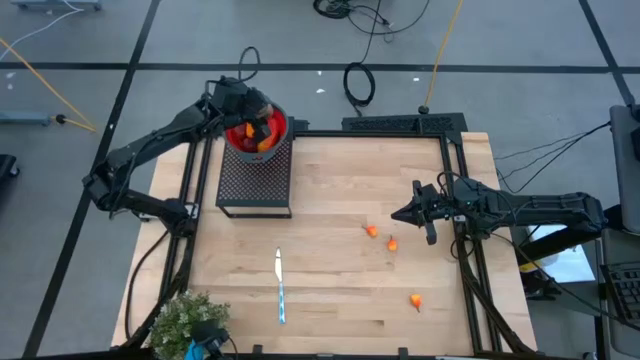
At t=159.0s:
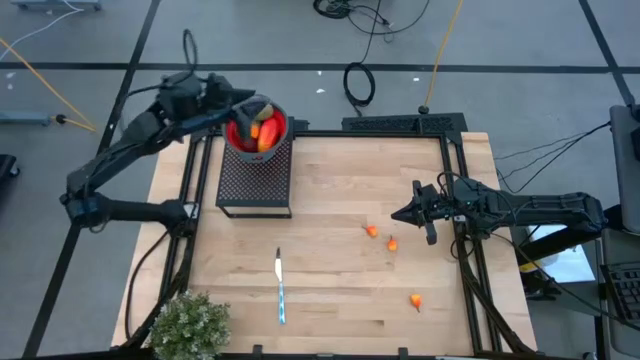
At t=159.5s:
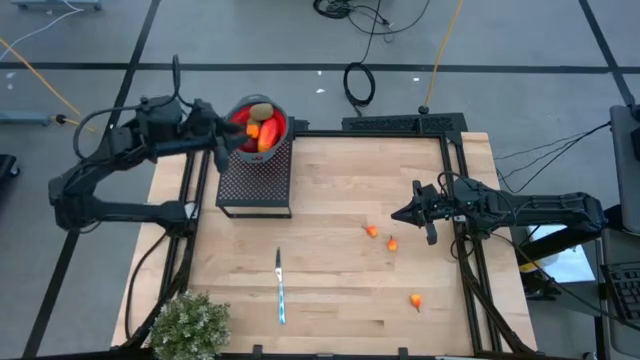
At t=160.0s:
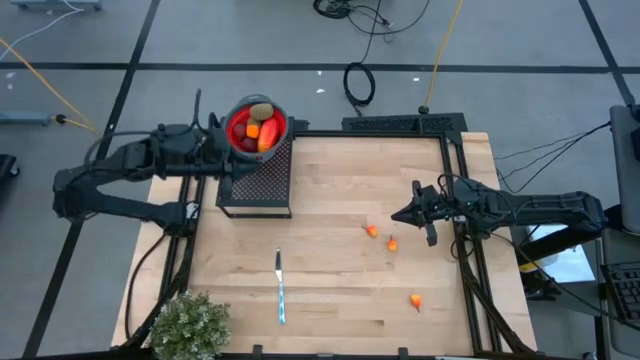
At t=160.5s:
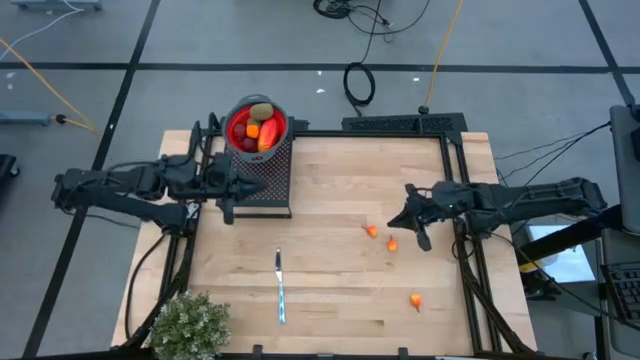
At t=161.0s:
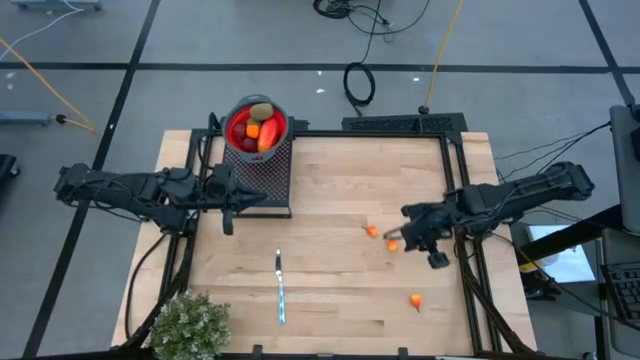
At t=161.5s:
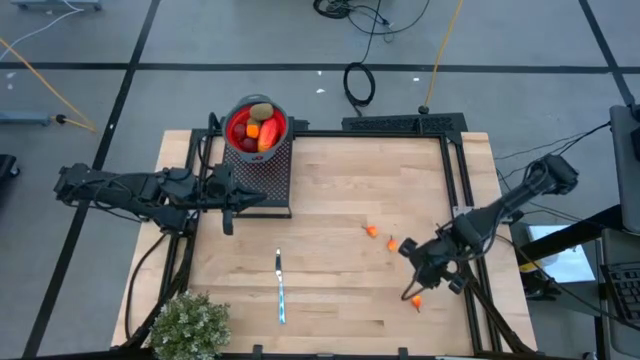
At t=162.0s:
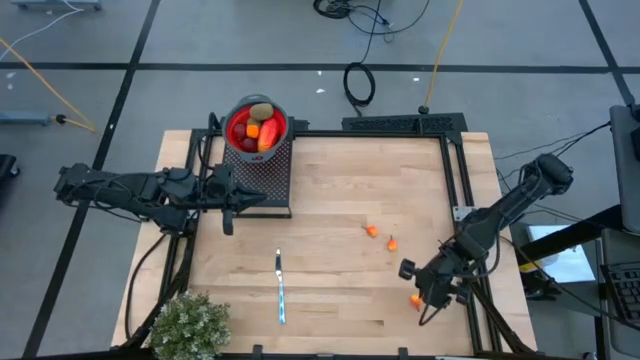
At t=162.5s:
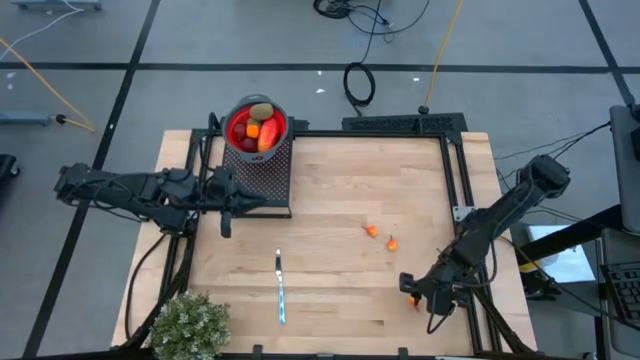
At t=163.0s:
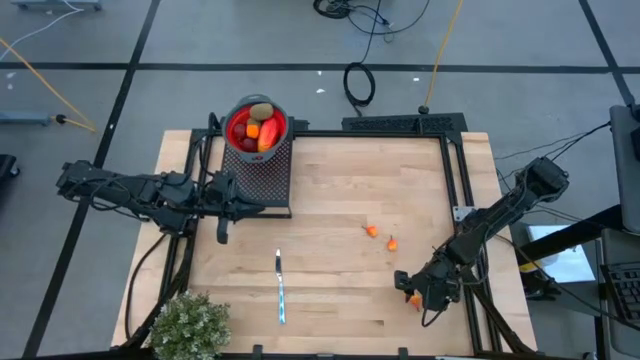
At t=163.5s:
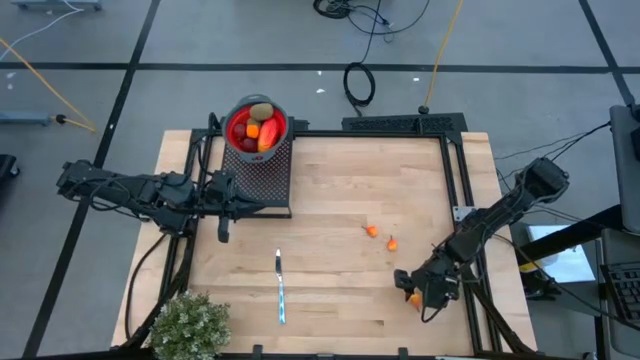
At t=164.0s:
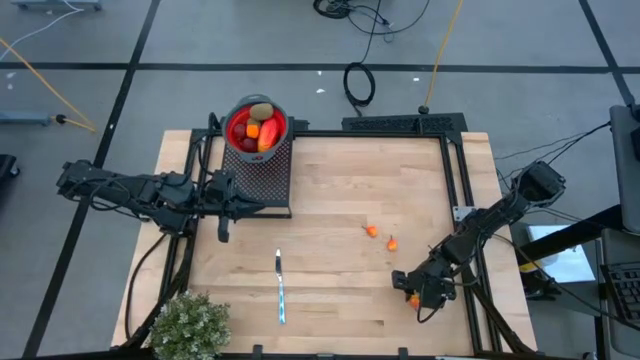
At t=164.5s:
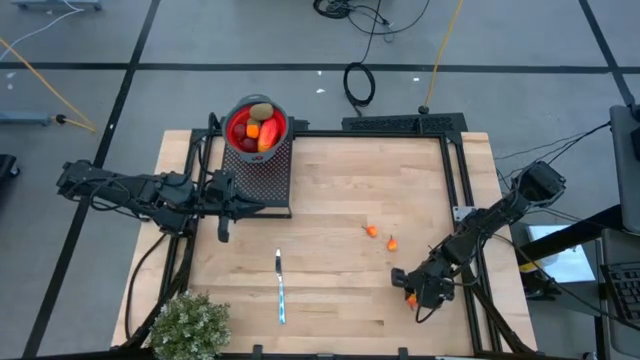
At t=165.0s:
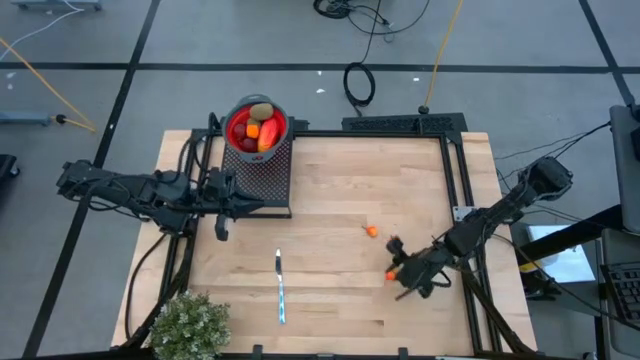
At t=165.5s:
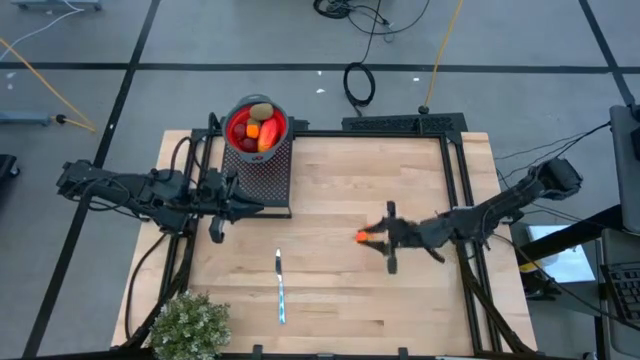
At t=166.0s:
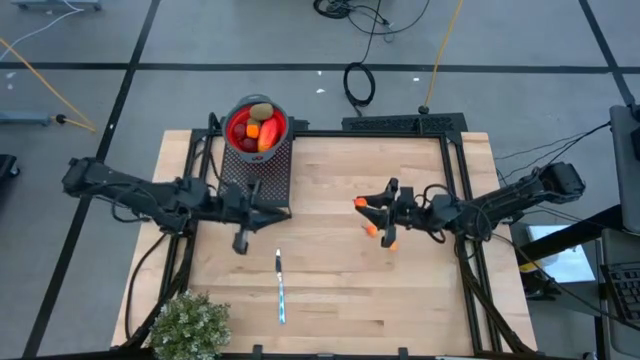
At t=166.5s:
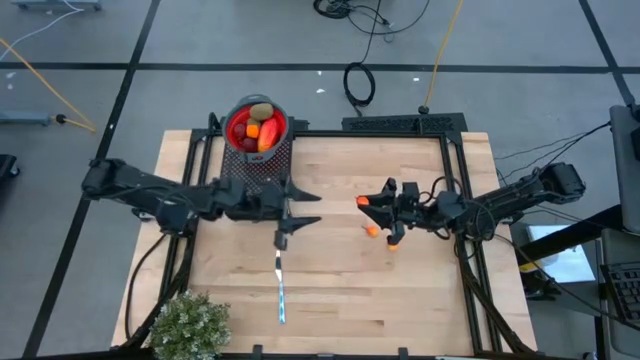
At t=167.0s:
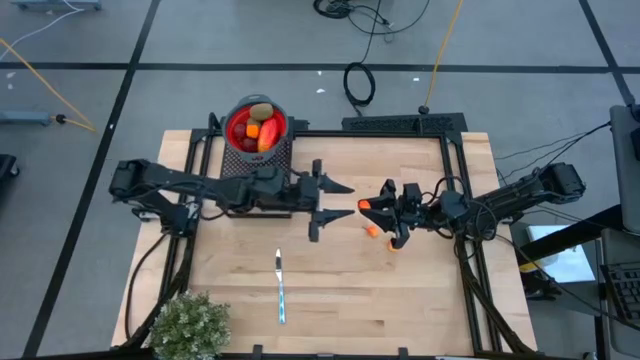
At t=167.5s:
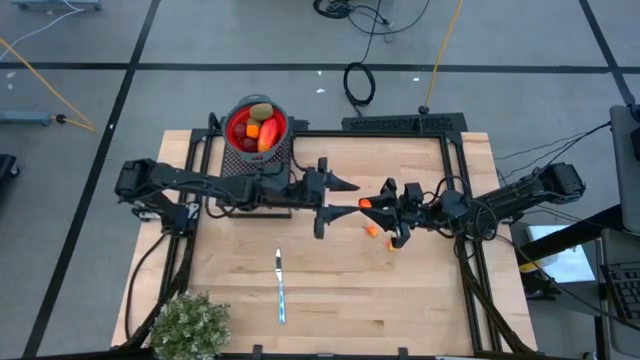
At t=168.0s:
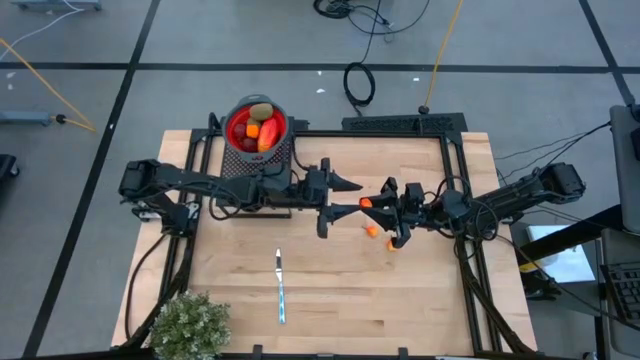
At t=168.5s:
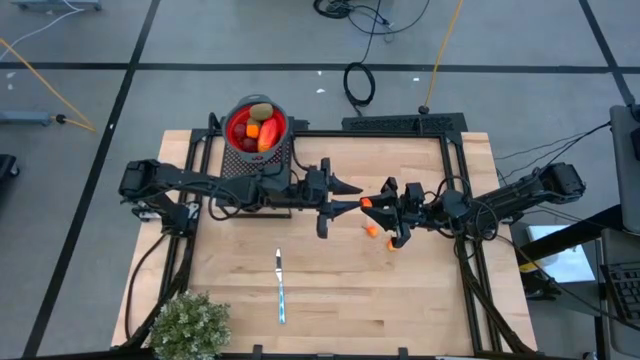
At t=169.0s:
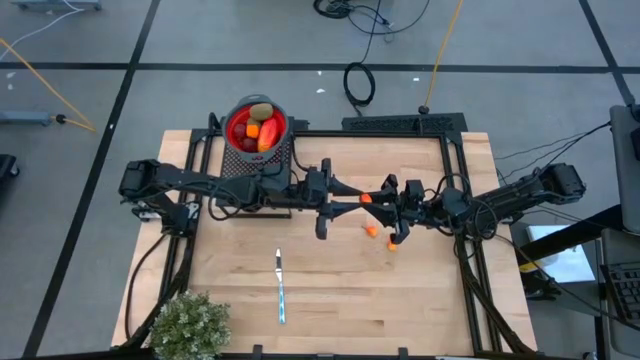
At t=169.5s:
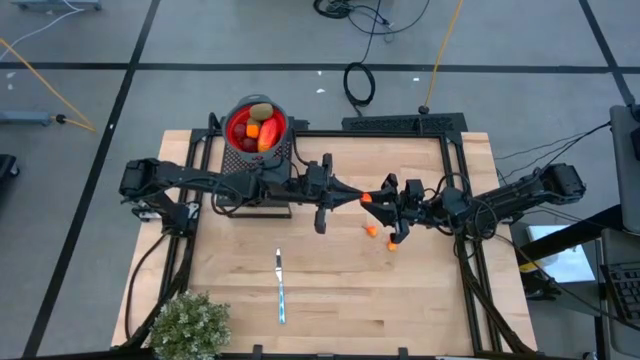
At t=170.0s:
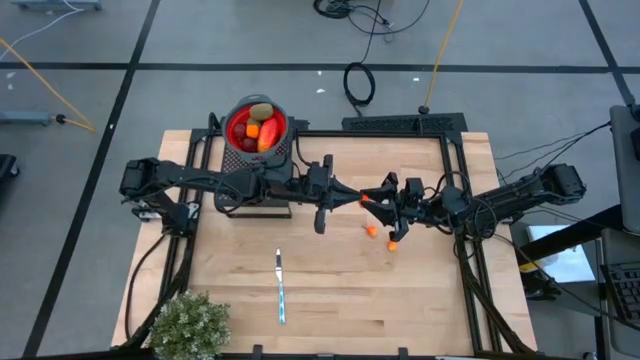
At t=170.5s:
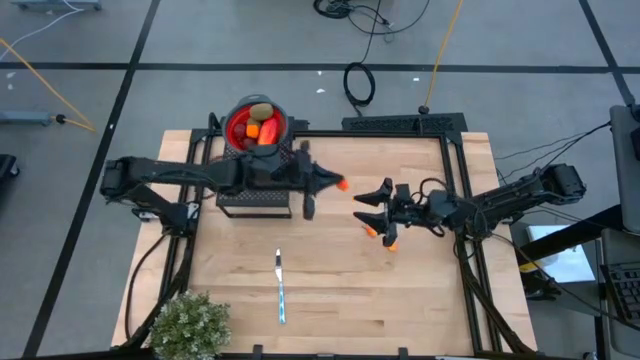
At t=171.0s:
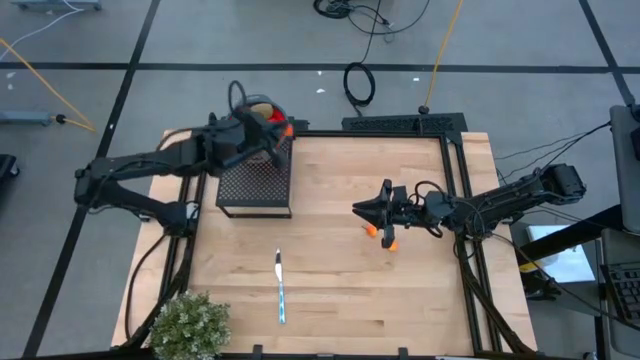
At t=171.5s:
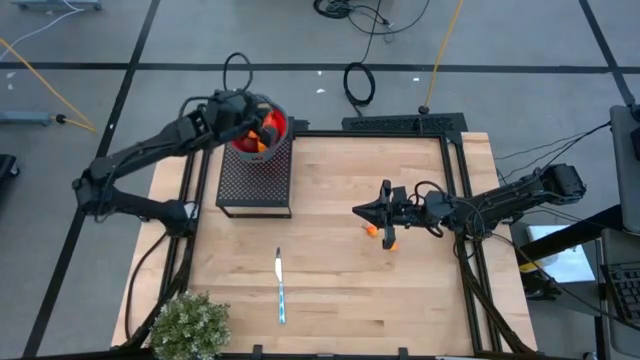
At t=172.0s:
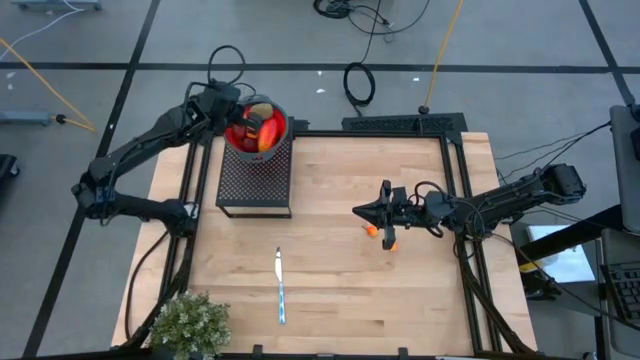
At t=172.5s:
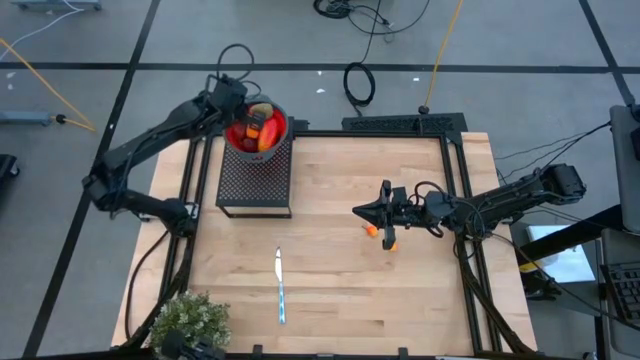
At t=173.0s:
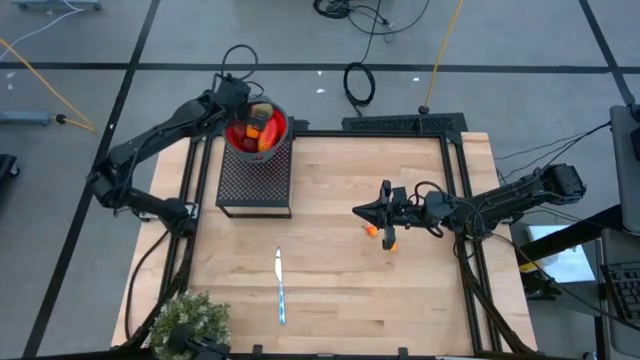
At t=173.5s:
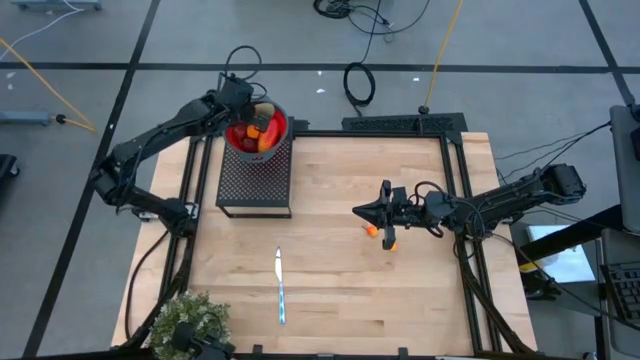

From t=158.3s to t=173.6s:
Task: Pick & Place Fruit
Put the peach into the red strainer bowl on the shelf

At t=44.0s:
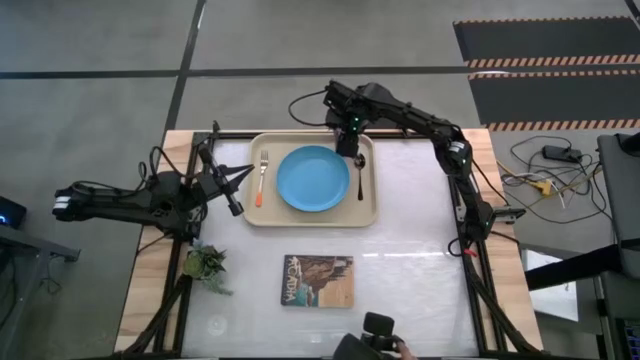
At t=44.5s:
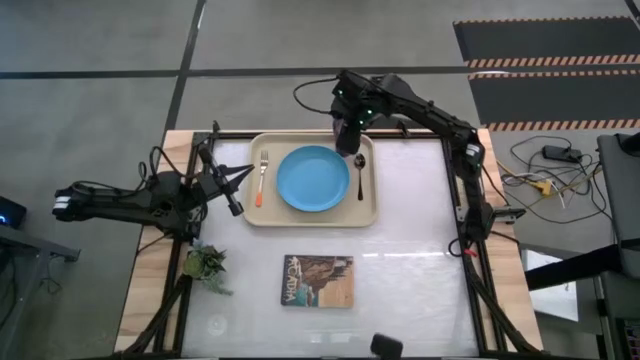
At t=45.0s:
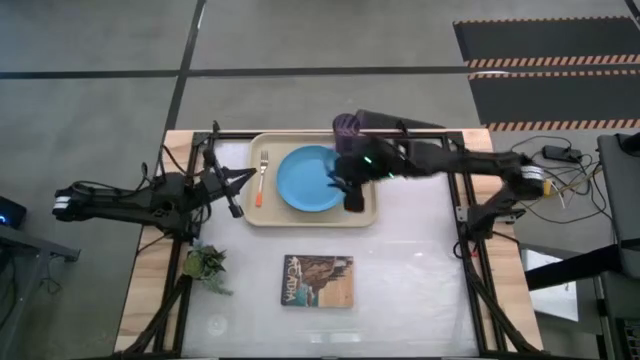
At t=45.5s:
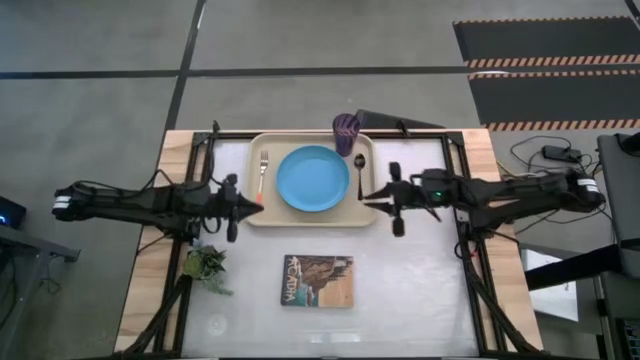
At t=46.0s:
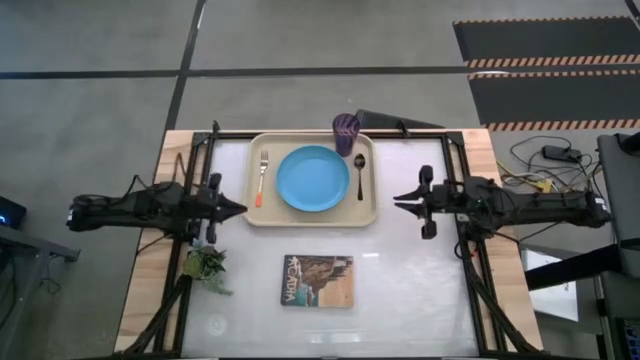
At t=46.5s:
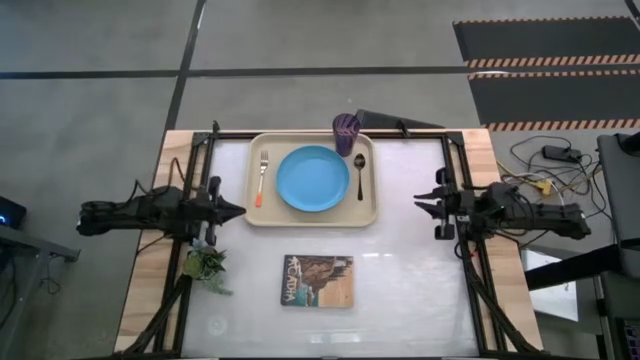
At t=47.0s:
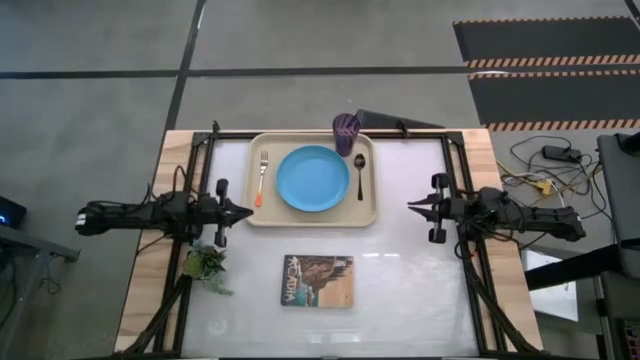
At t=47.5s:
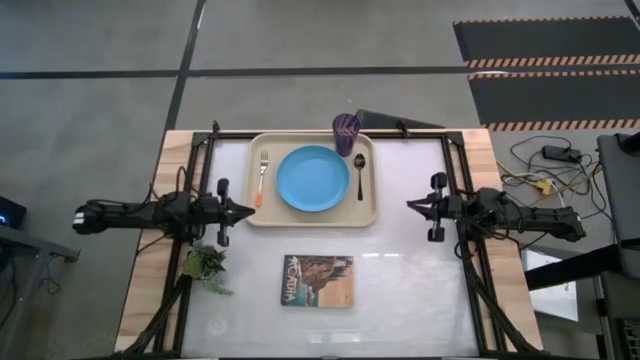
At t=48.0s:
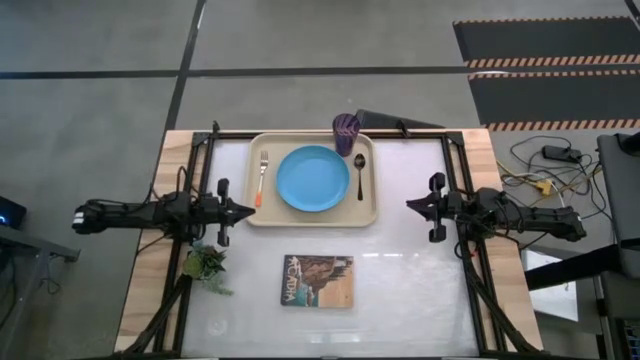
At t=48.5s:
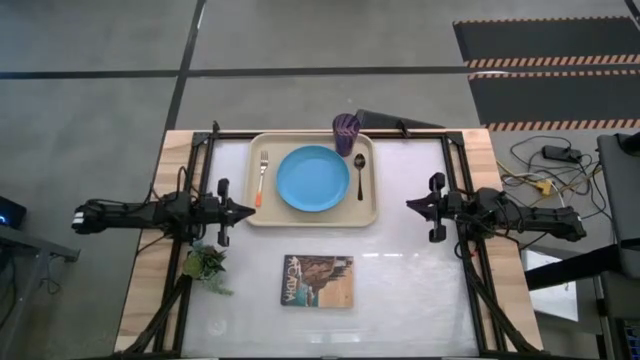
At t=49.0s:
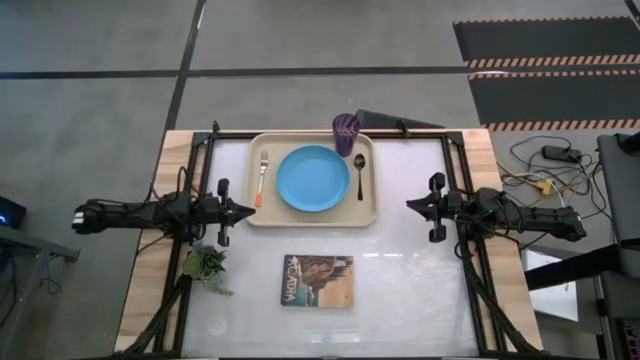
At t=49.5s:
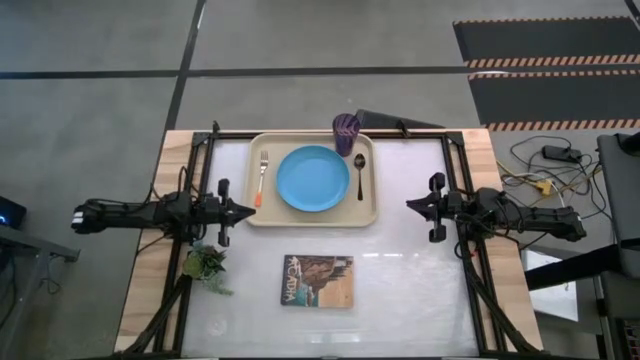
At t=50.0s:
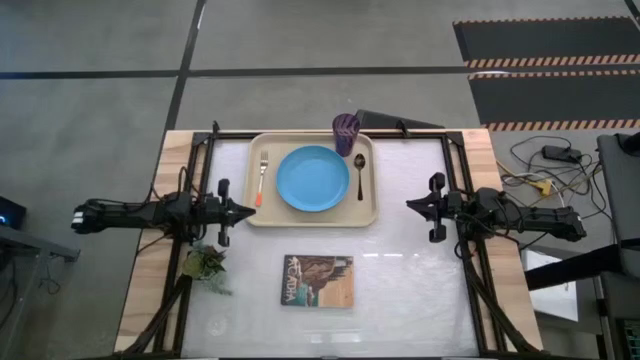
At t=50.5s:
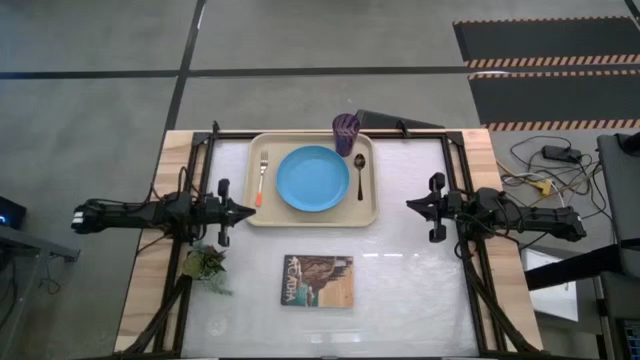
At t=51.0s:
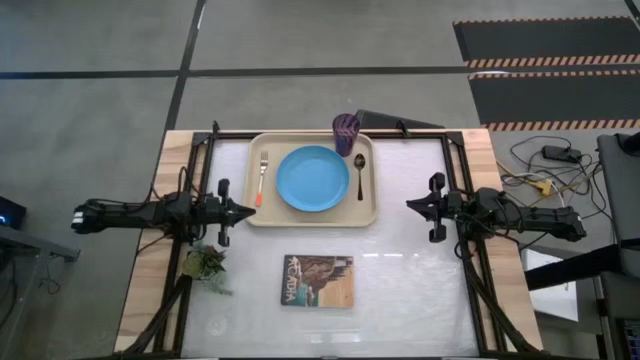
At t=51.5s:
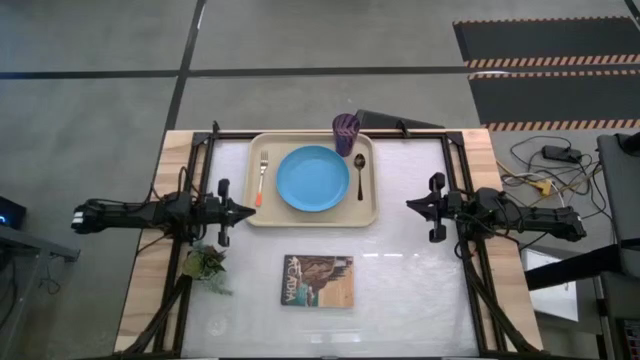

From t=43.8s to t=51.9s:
Task: Pick and place plate/cup/fork/spoon on tray
Return to Home Position
